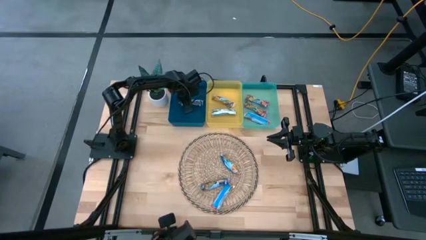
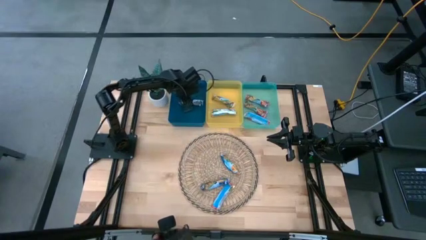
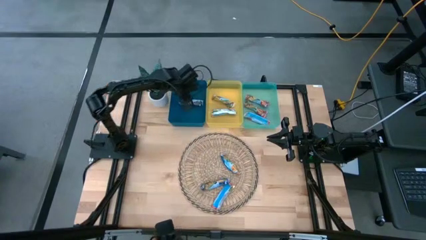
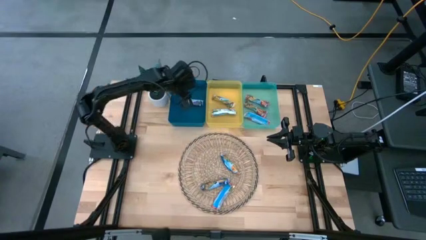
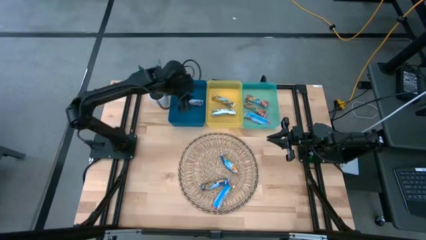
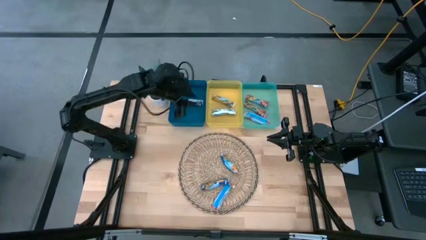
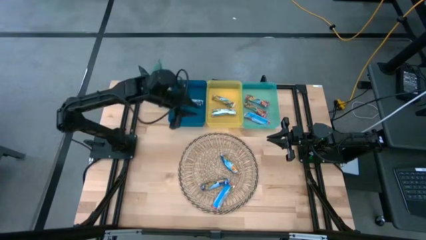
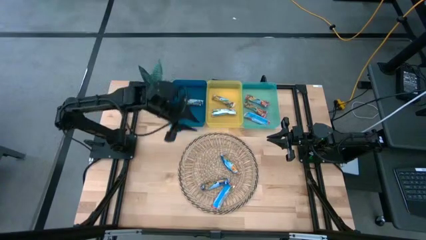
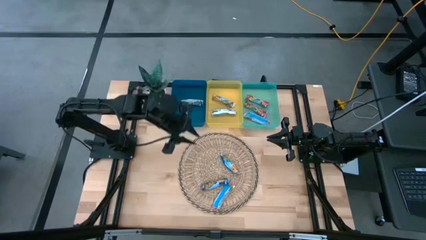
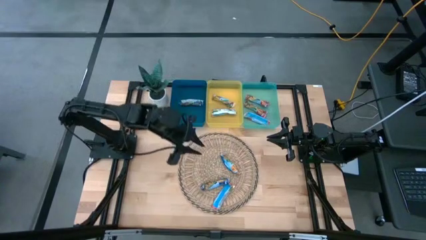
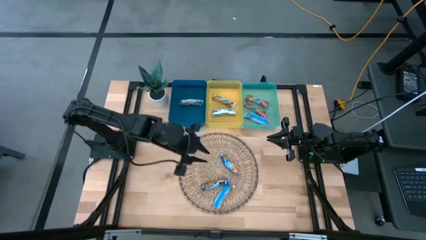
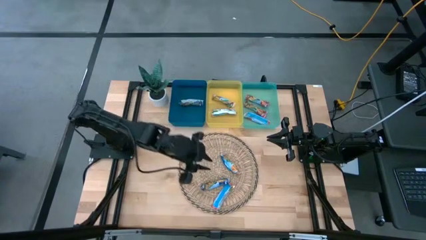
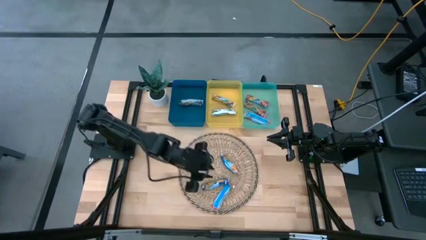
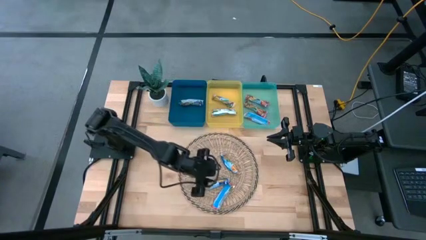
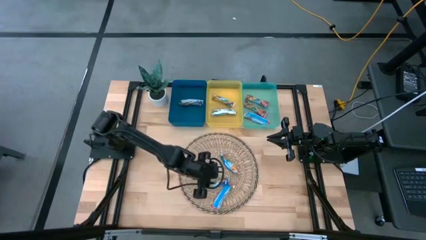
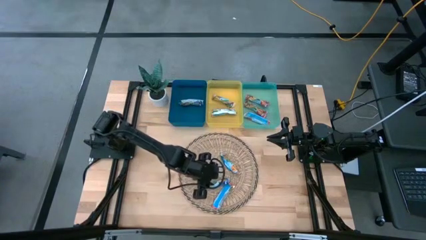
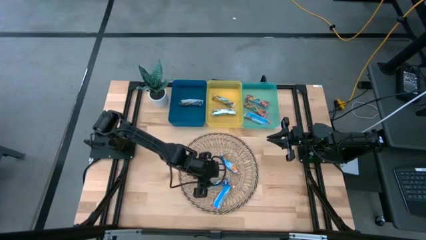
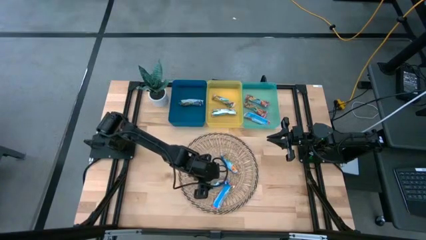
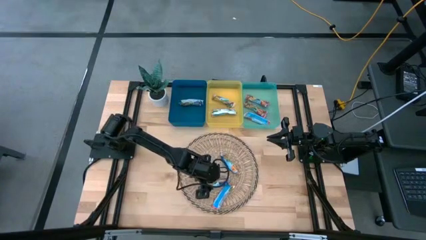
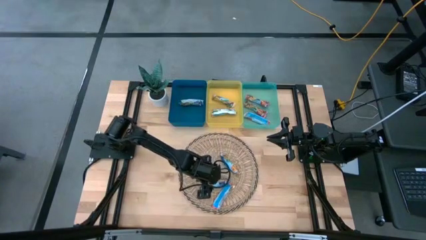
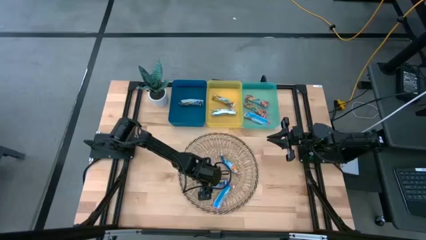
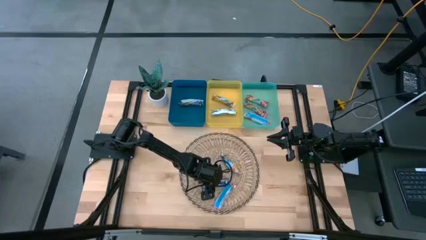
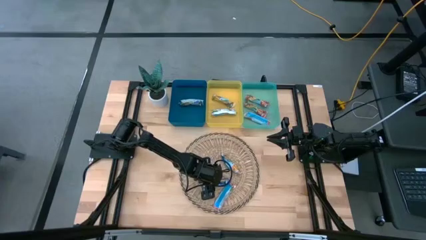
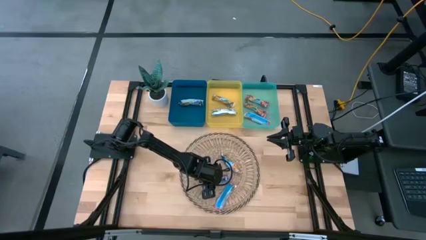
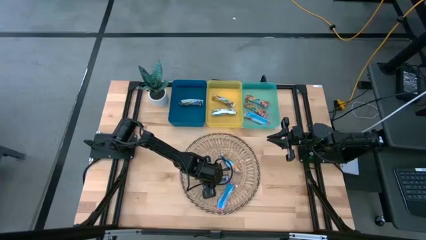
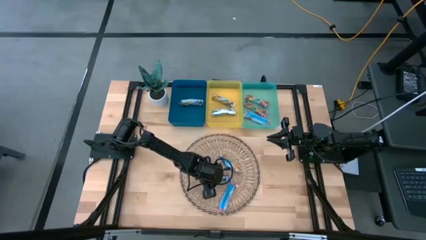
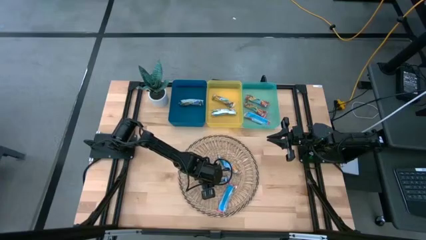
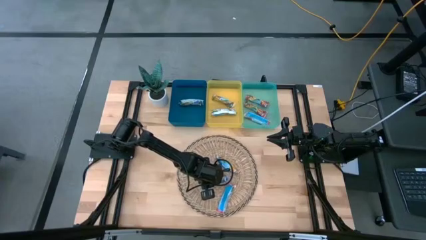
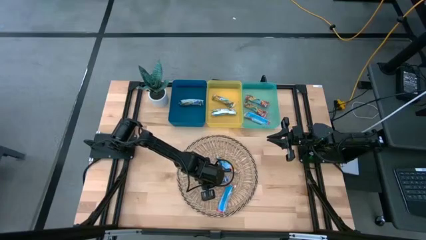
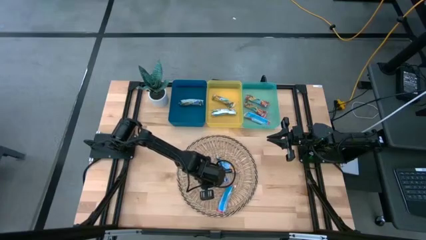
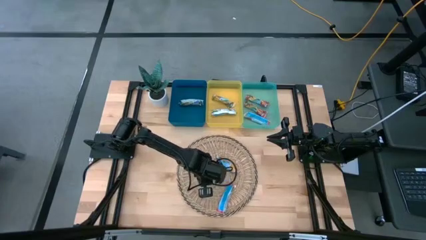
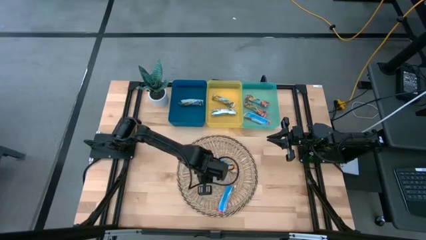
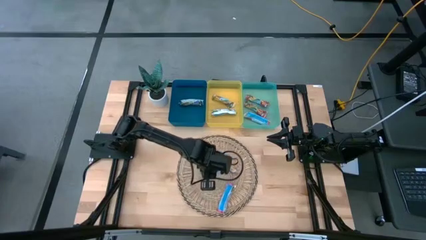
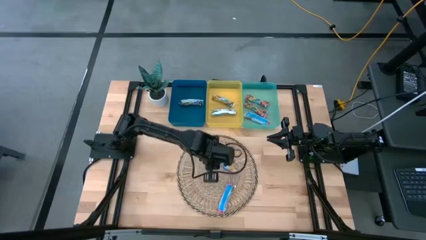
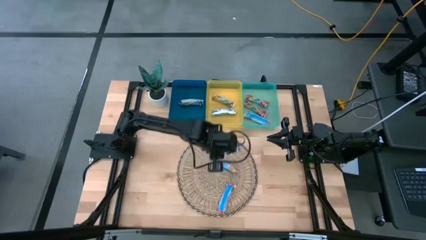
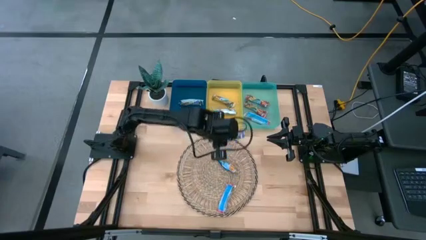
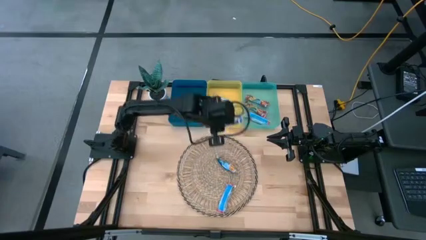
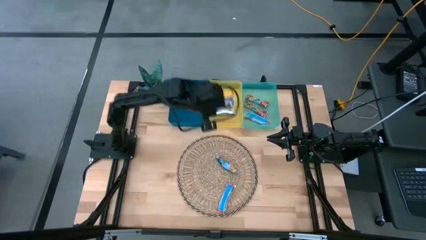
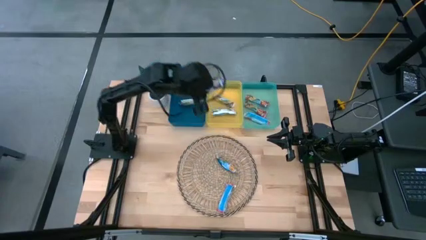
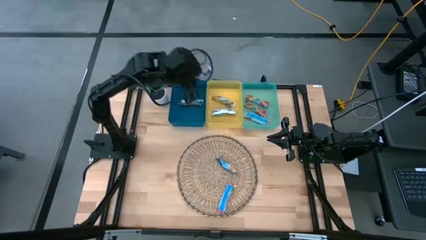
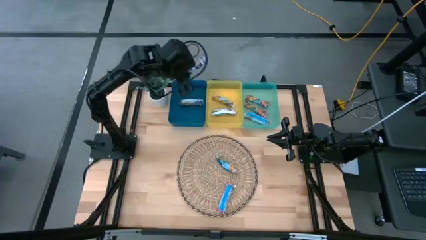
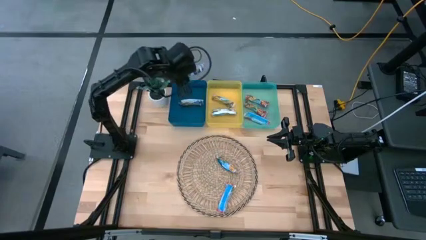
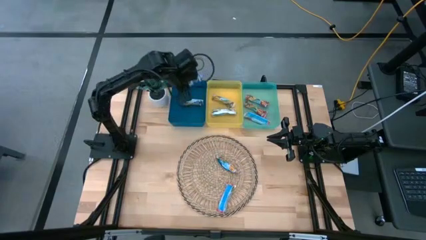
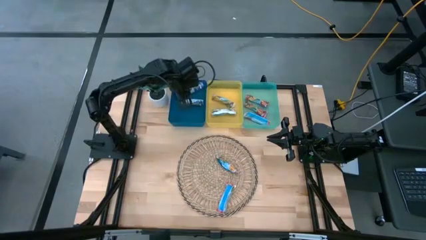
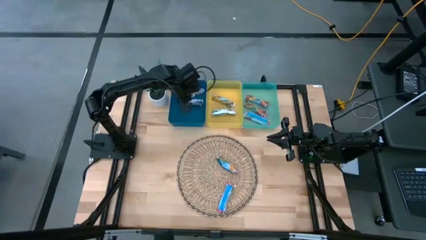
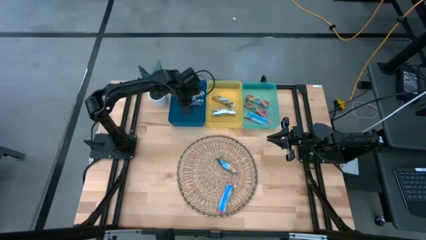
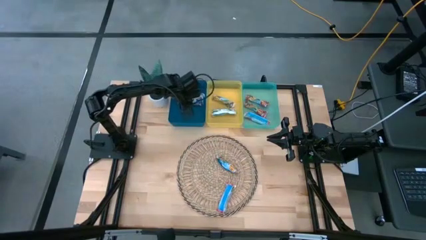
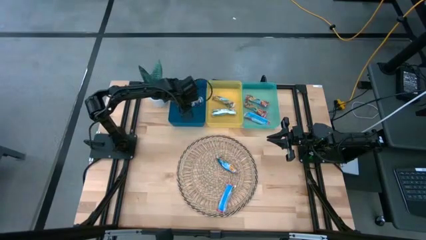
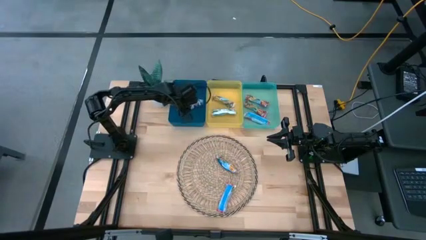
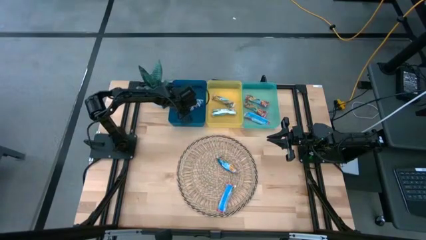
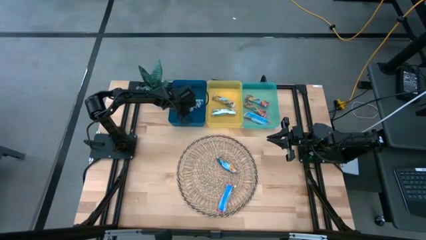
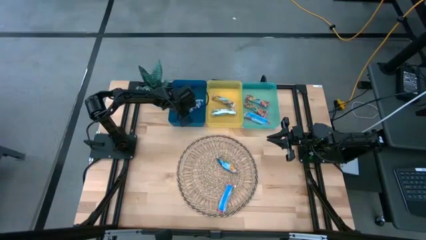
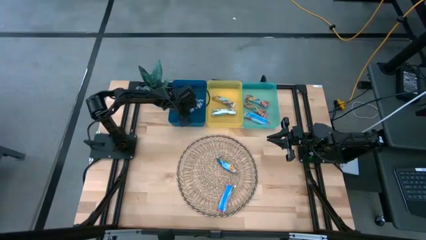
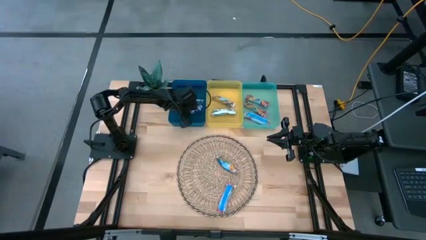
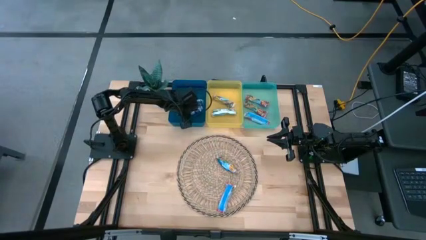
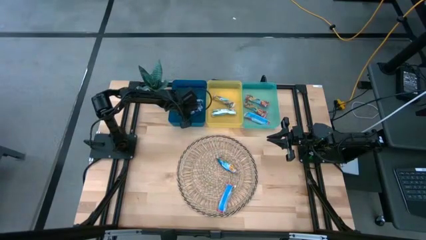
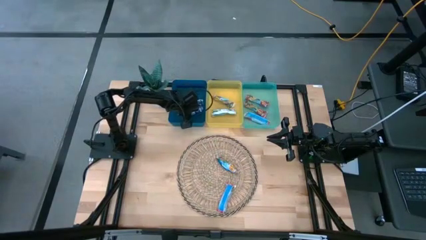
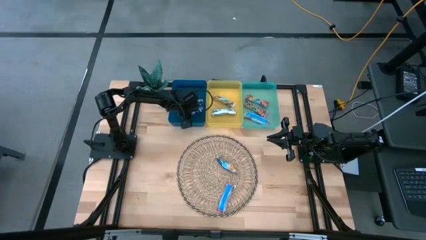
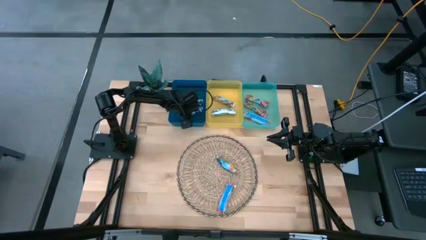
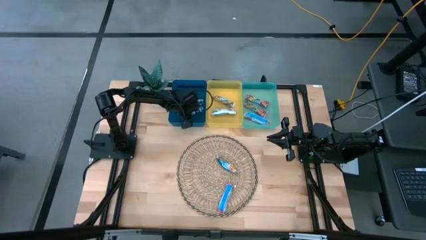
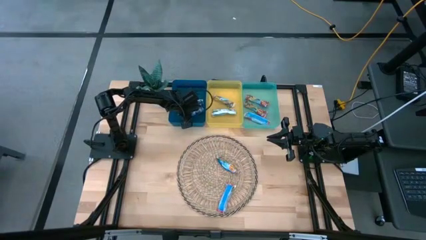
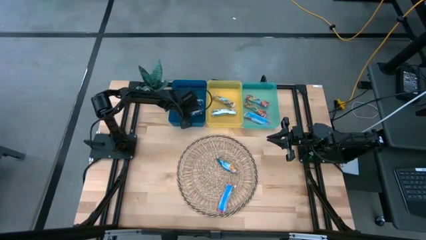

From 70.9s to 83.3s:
Task: Pick and place Granola Bars by type
Put the blue granola bar into the blue bin

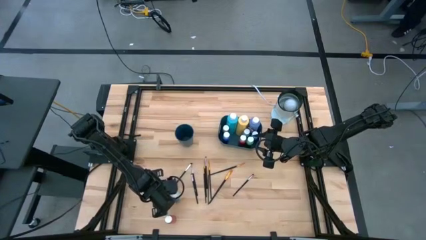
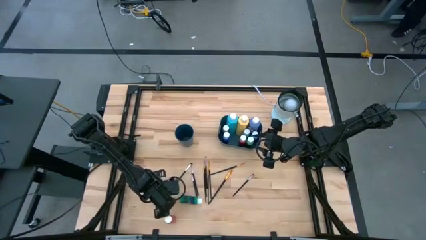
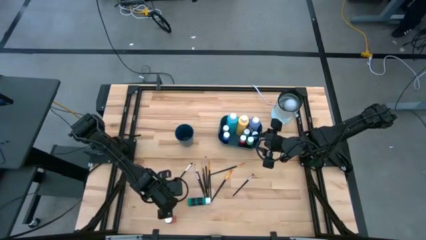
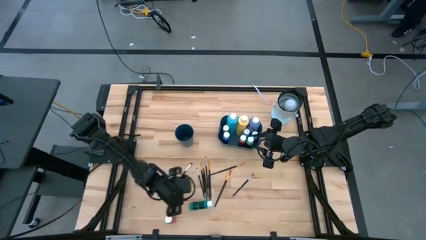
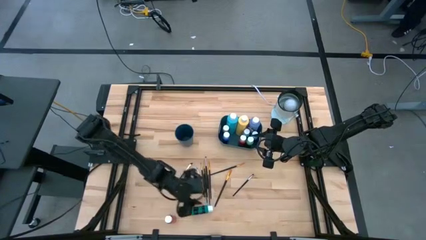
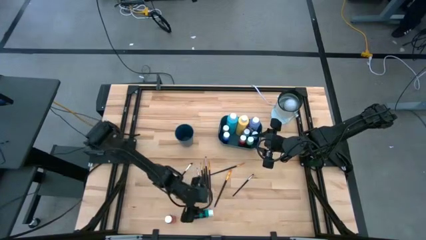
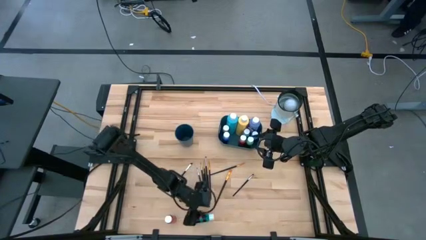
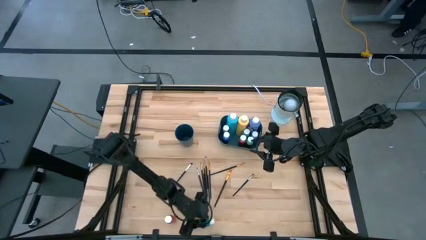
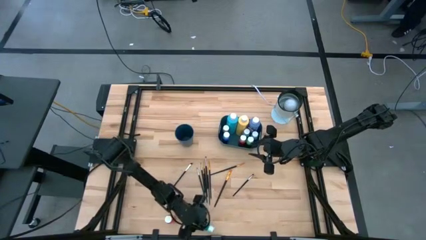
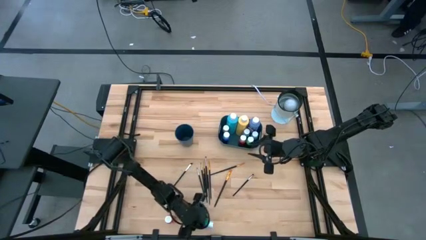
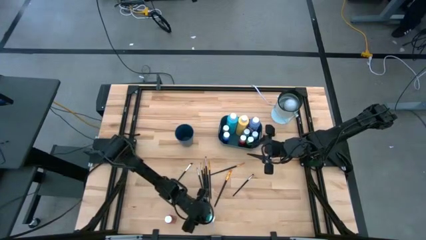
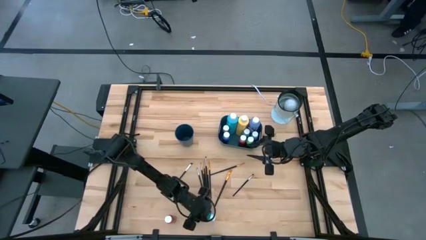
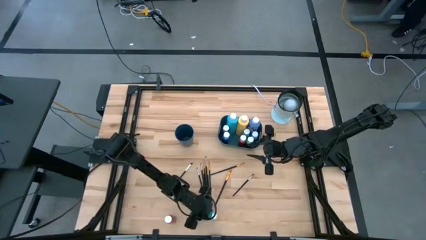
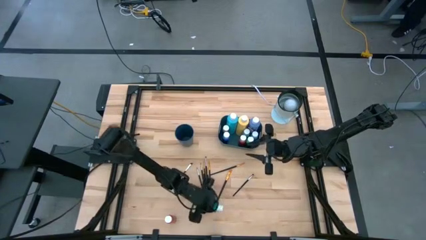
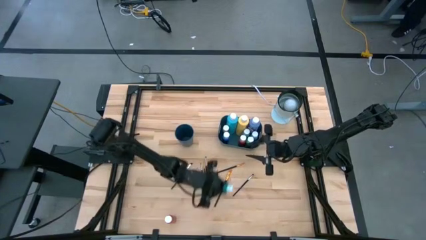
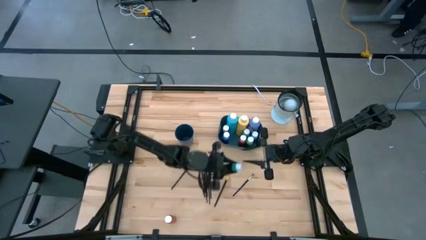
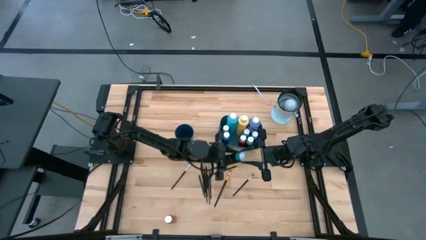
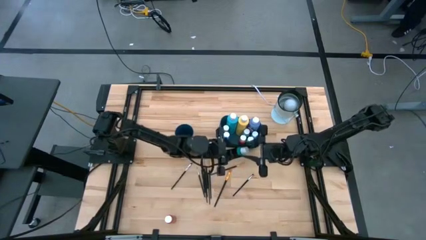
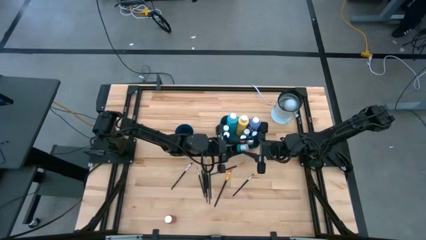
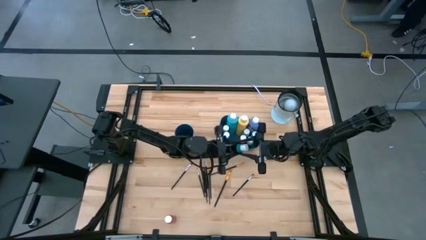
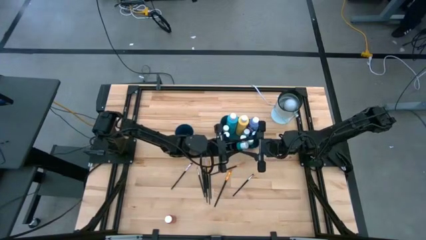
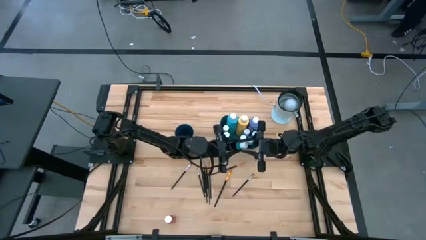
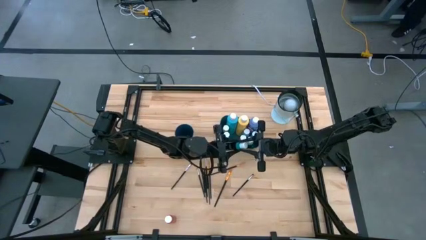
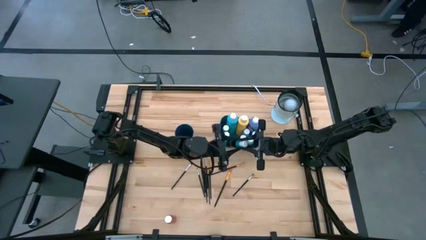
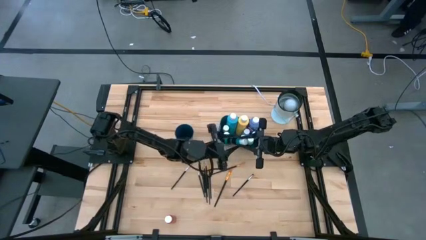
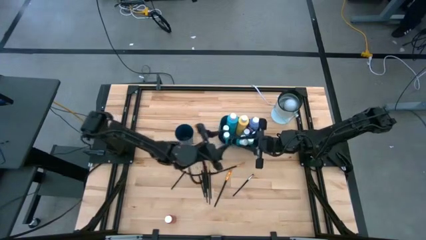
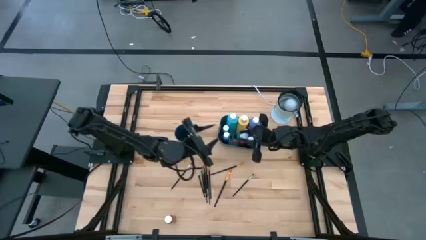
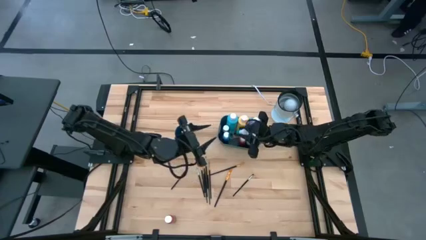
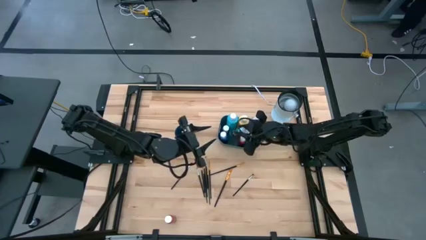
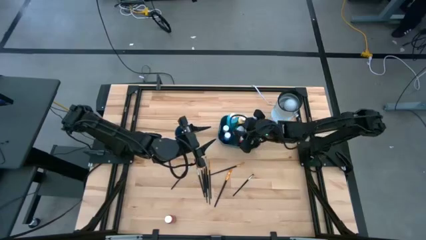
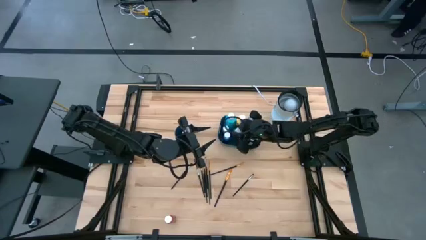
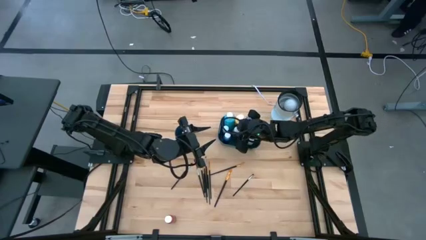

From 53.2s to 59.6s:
Task: Pick & Place Paint Supplies
Put the small light green paint bottle into the blue bin
